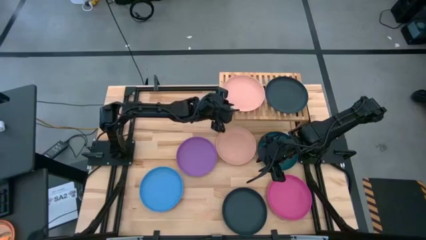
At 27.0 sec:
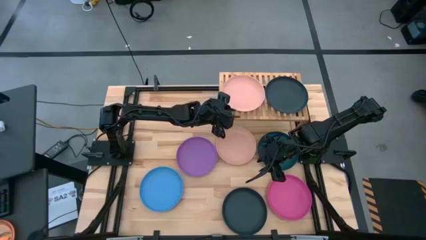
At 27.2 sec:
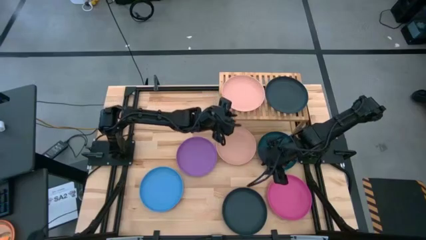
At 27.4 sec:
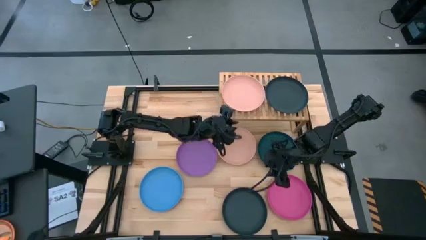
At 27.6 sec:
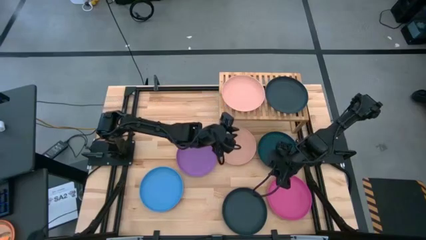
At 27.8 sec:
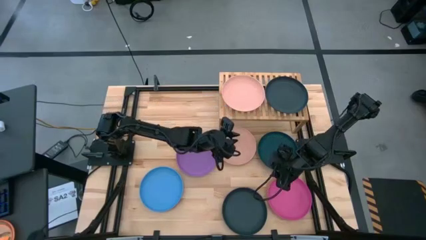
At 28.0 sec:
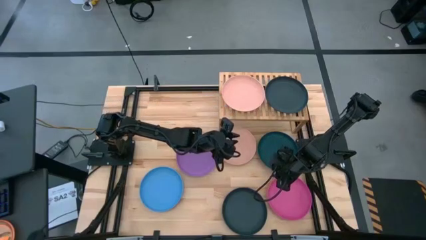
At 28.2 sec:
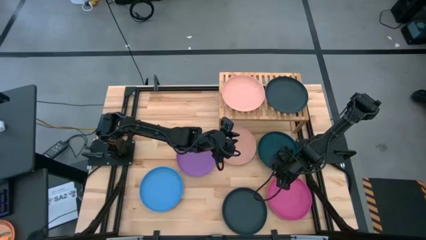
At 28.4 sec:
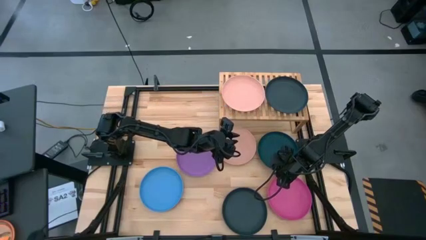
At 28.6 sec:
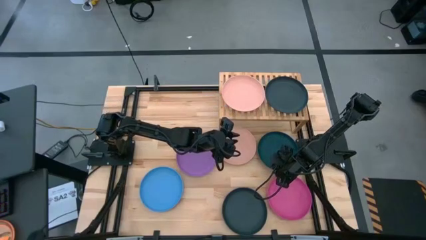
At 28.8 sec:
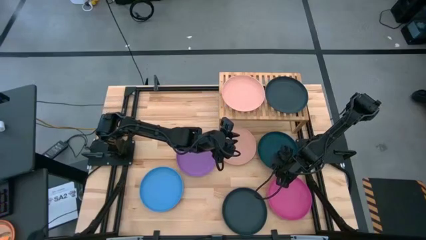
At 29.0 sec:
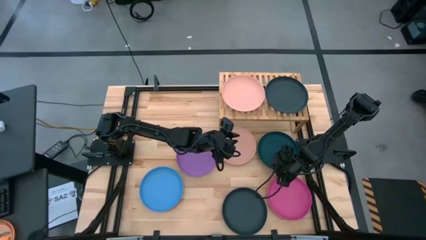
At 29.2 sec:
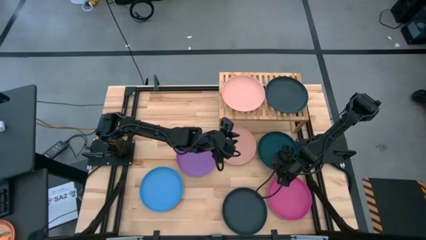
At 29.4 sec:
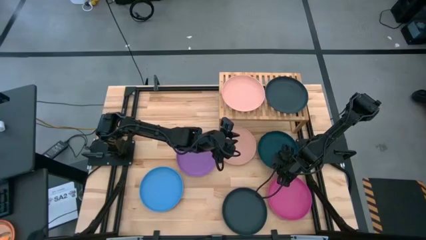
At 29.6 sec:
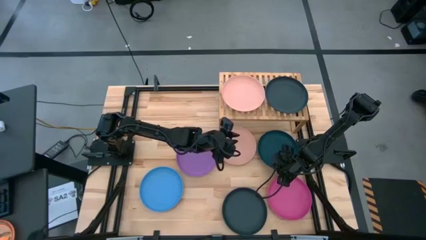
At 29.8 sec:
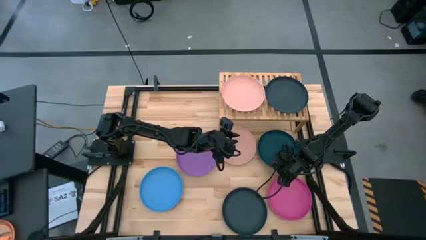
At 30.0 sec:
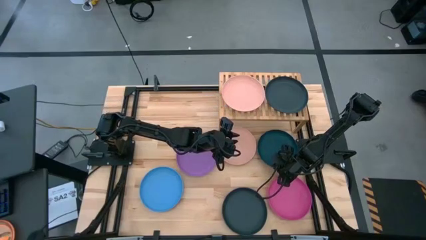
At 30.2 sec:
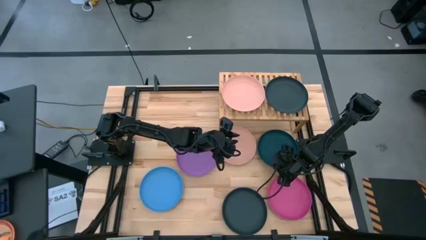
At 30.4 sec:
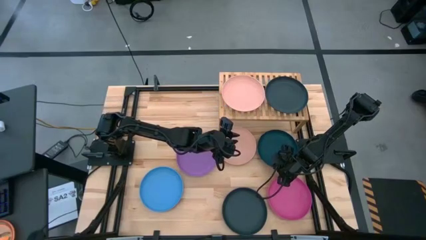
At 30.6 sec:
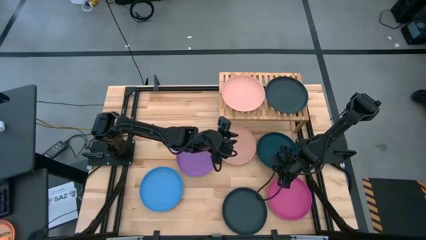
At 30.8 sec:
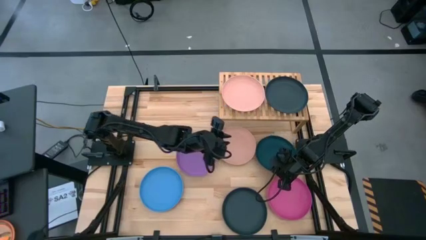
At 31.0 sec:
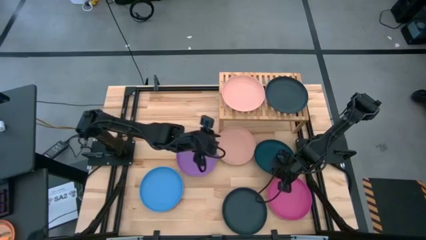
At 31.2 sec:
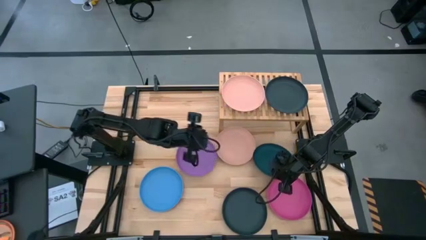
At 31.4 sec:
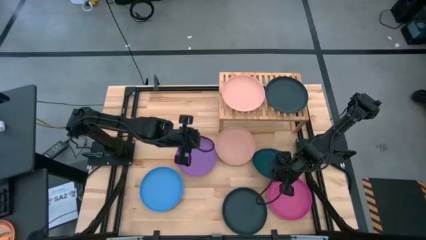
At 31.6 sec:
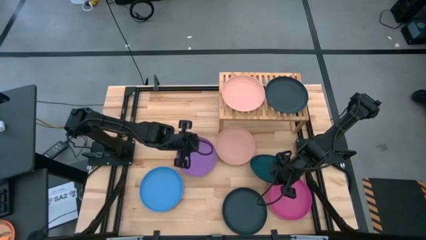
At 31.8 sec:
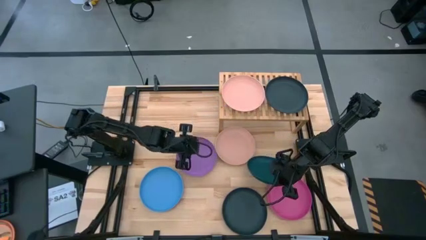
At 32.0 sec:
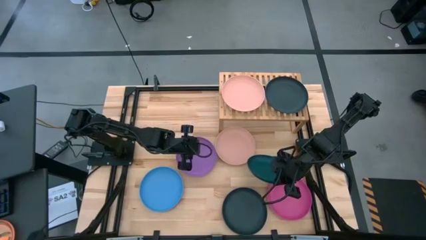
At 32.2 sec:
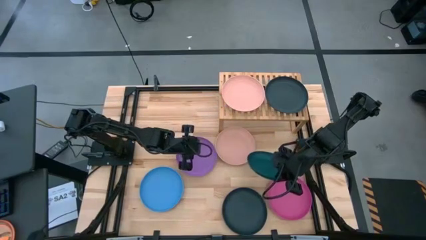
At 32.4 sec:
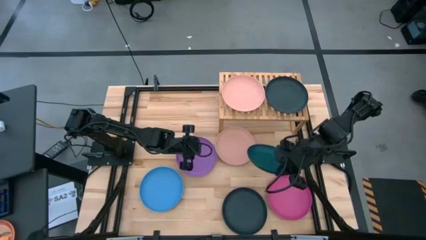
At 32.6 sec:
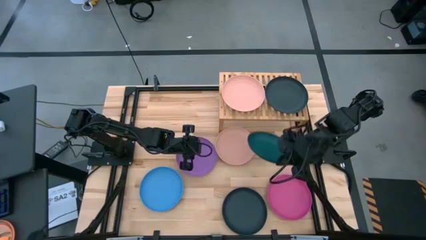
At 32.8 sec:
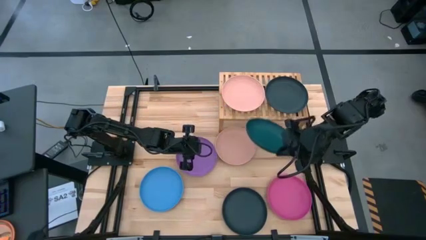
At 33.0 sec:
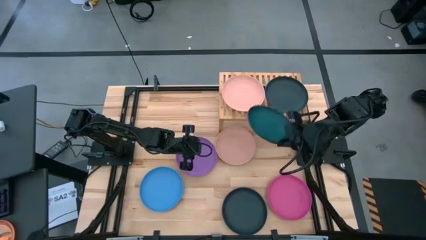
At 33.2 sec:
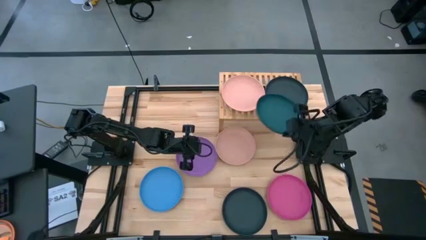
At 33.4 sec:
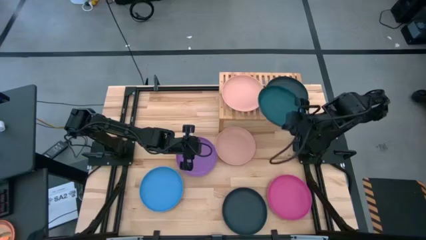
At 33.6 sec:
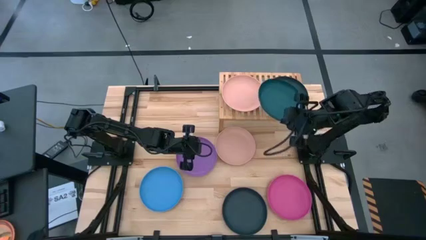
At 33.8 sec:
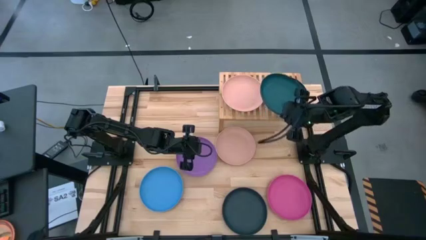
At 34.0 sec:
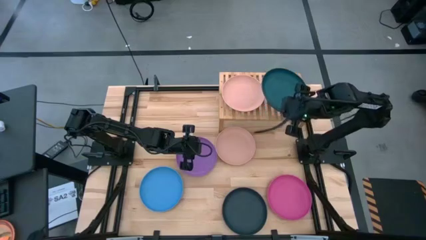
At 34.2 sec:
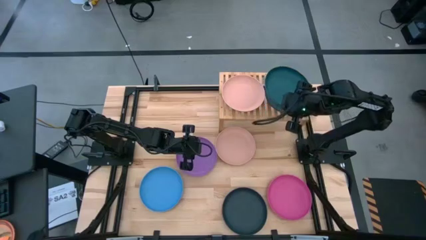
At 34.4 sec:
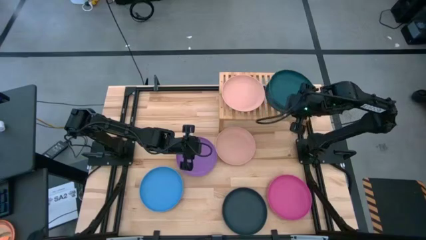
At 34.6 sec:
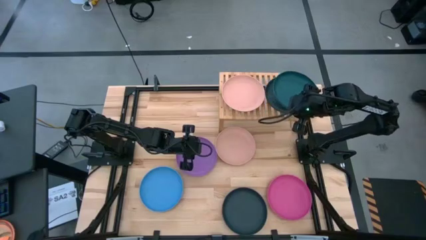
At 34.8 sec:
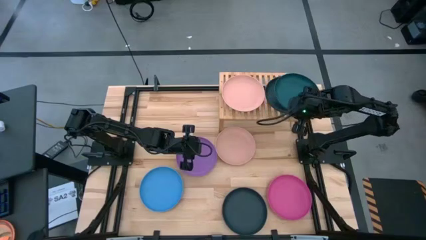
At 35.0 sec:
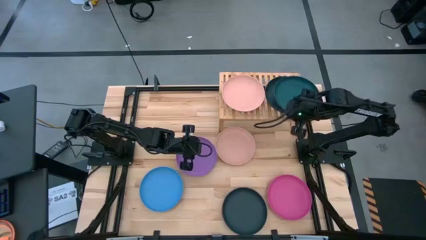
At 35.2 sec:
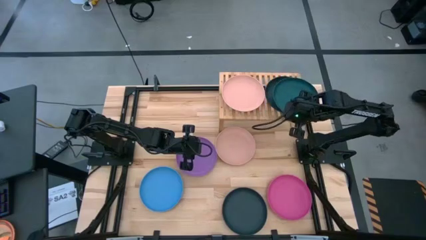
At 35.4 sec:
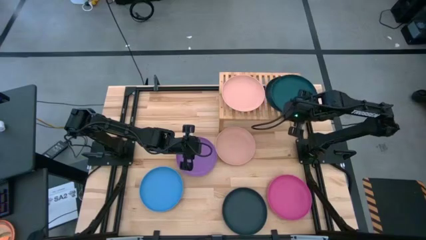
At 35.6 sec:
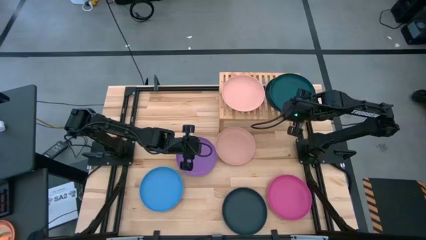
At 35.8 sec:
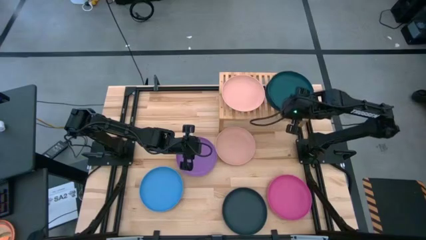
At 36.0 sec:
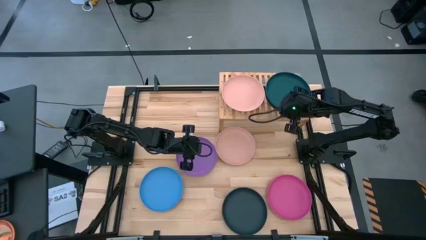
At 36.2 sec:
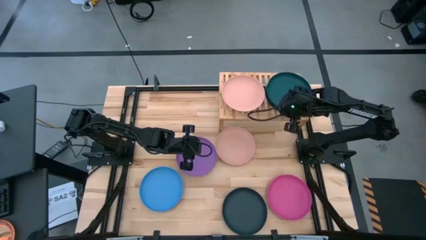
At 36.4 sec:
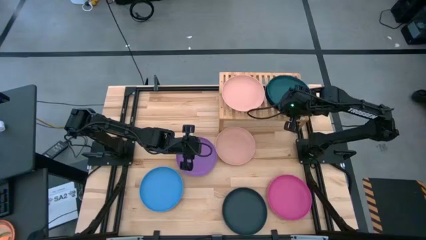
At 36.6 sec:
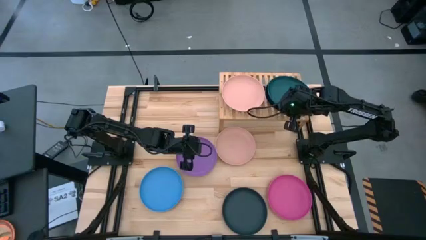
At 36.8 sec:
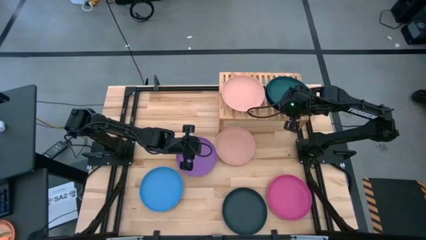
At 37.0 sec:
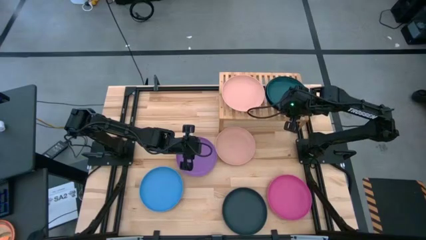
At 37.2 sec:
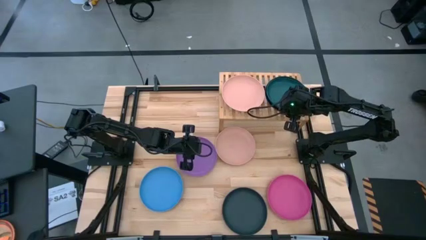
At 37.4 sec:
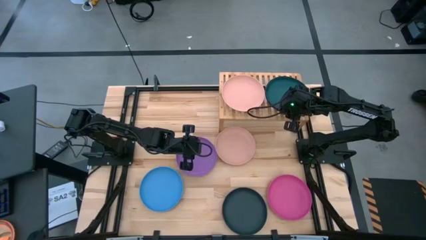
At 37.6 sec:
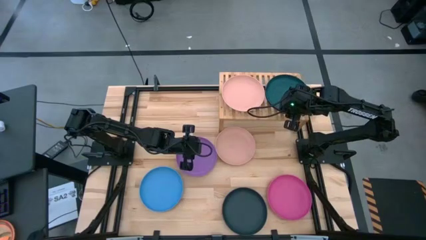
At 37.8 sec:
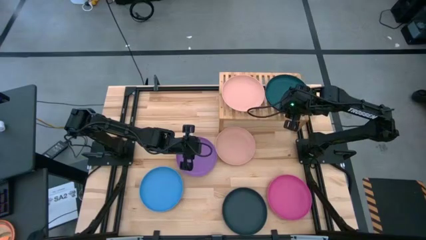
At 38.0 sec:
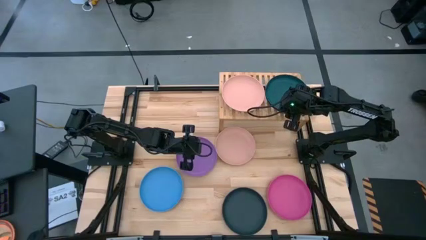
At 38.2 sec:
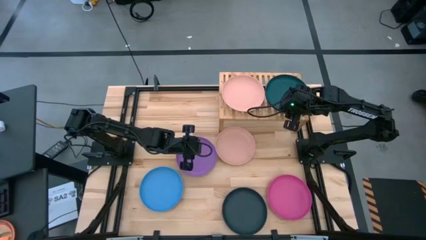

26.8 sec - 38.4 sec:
Task: Place and stack plates onto a shelf
Stack the dark blue plate on top of the black plate on the shelf
